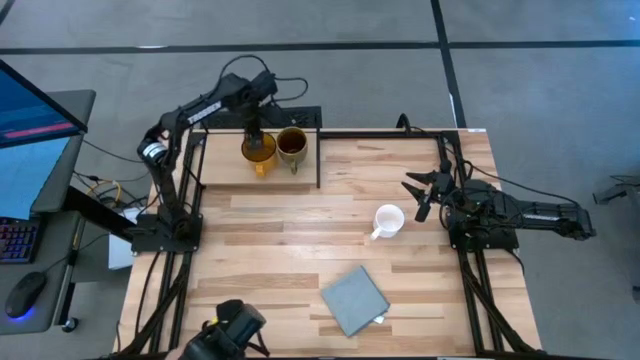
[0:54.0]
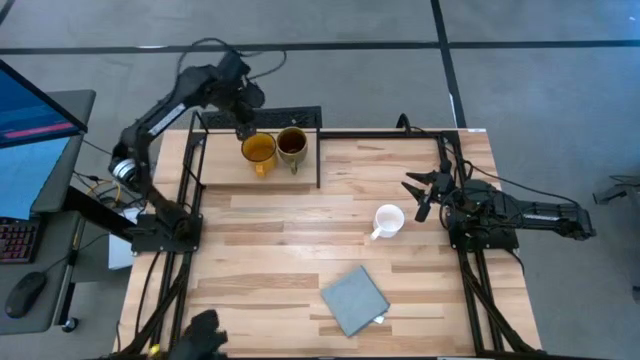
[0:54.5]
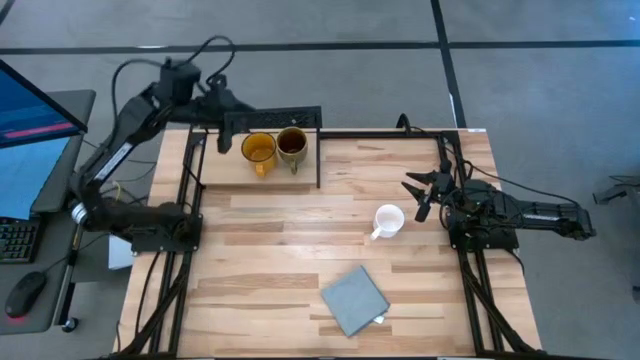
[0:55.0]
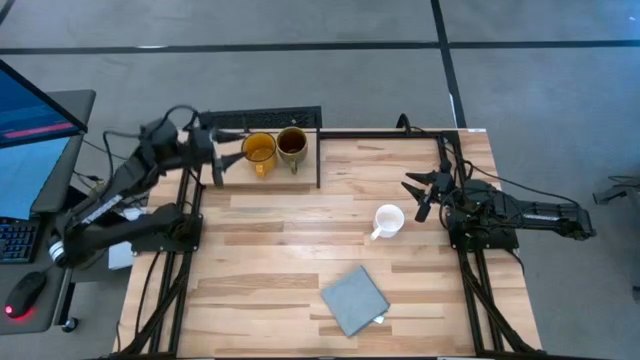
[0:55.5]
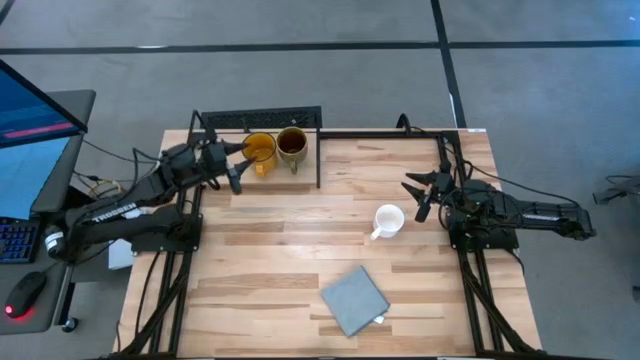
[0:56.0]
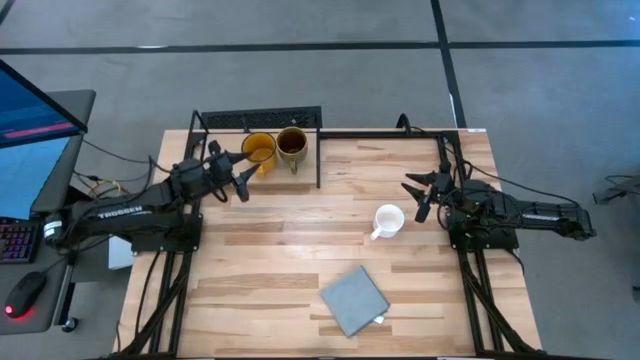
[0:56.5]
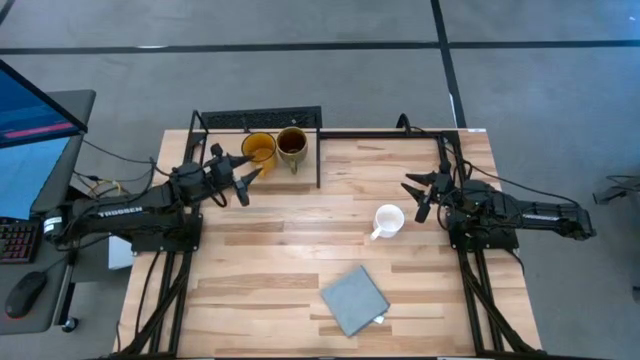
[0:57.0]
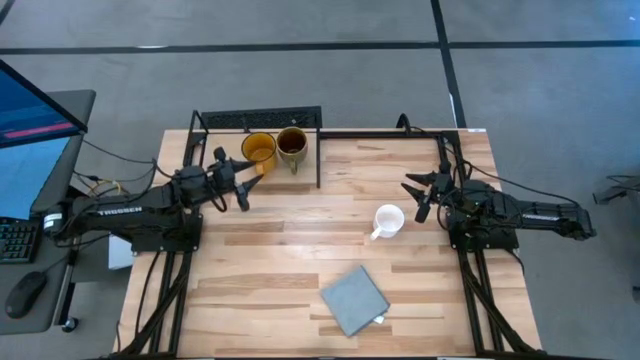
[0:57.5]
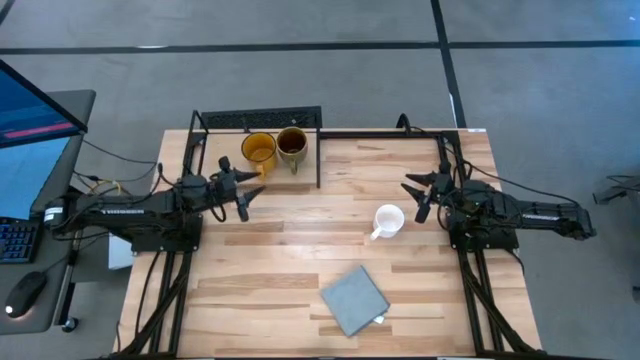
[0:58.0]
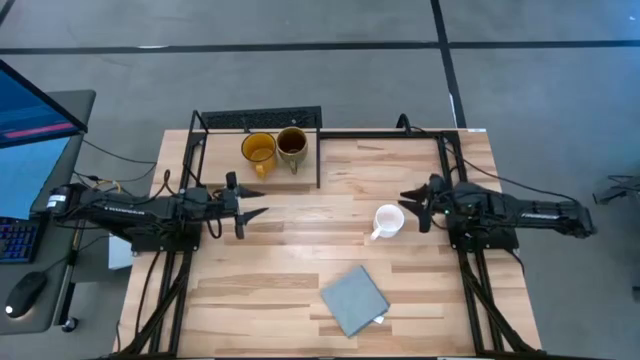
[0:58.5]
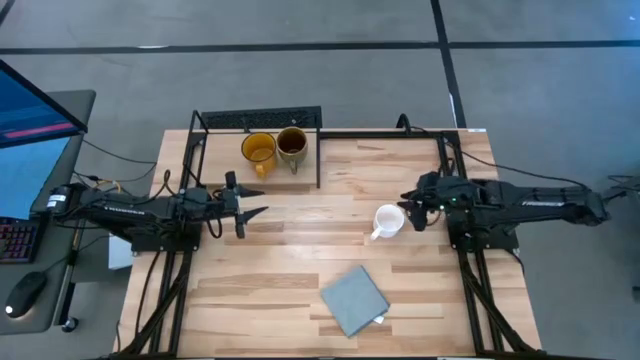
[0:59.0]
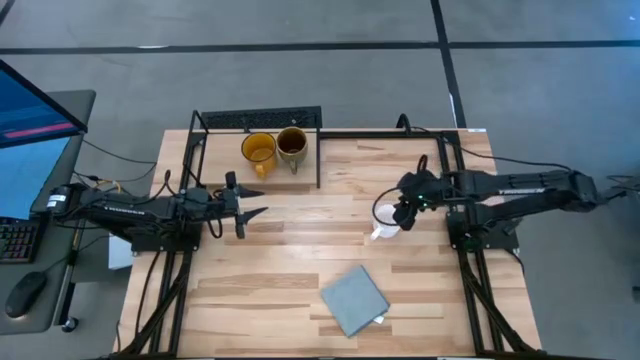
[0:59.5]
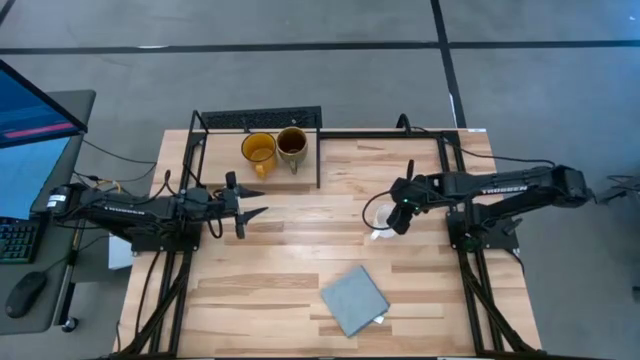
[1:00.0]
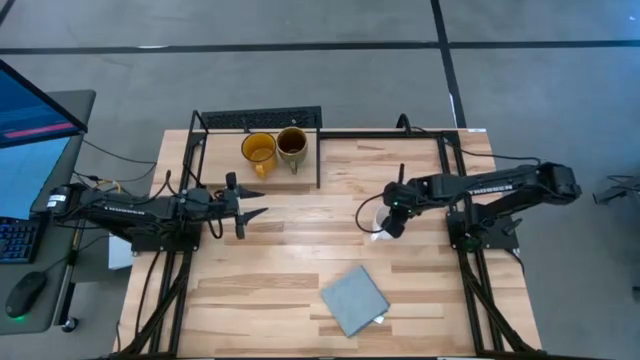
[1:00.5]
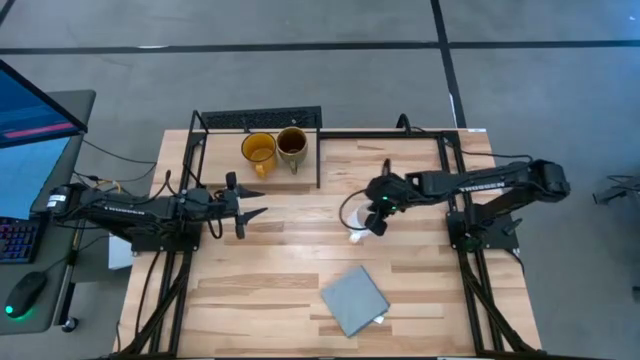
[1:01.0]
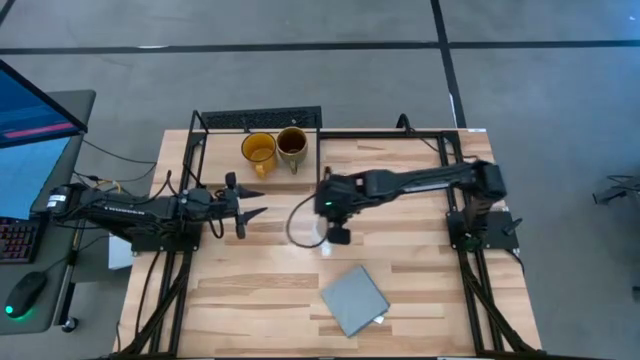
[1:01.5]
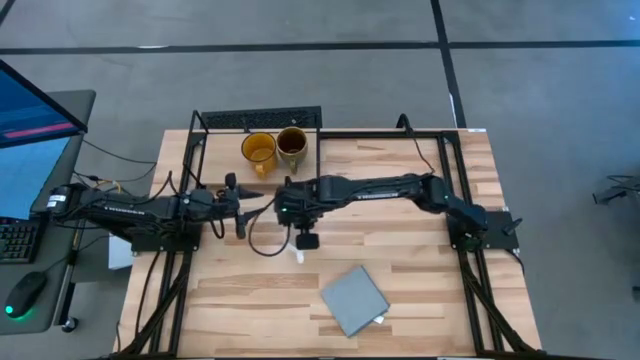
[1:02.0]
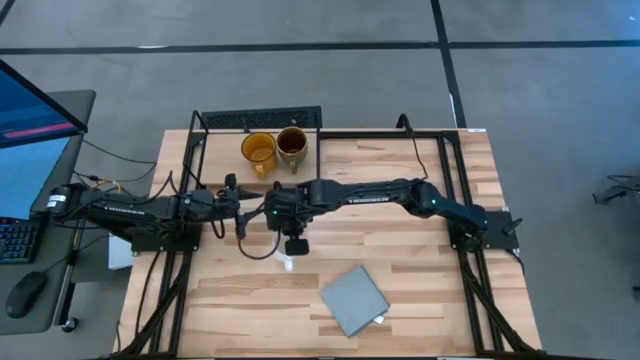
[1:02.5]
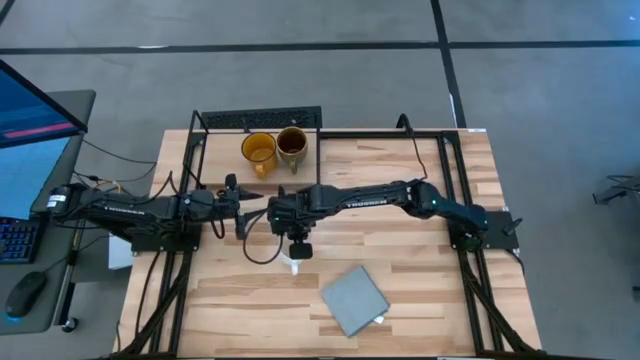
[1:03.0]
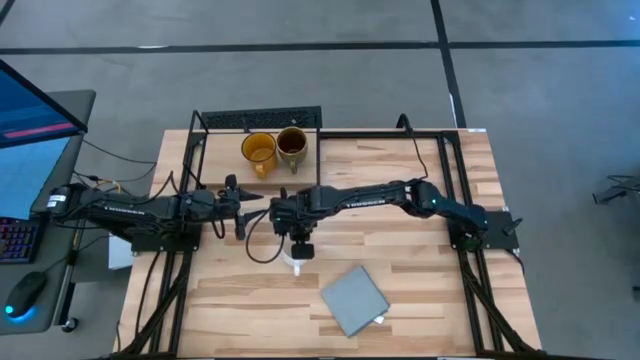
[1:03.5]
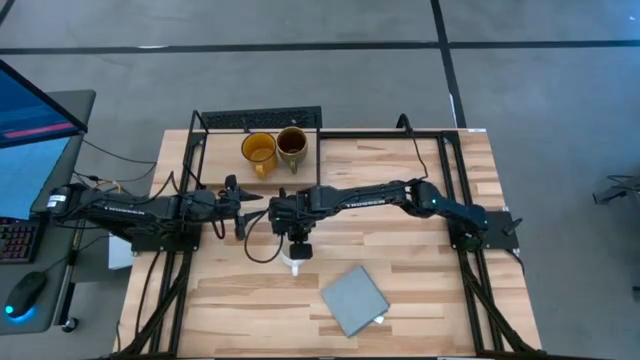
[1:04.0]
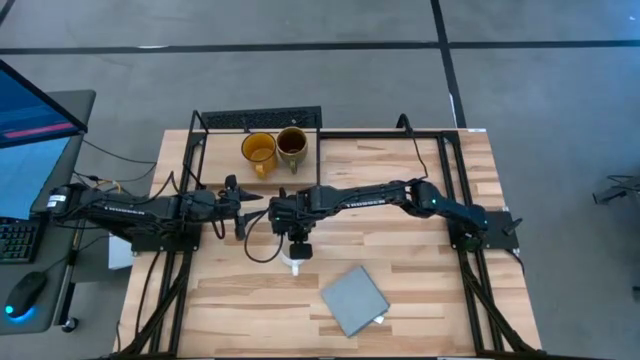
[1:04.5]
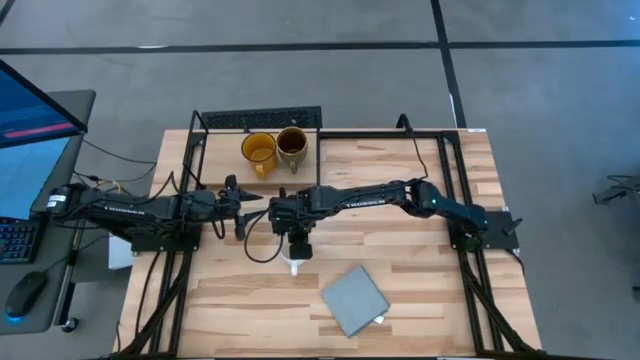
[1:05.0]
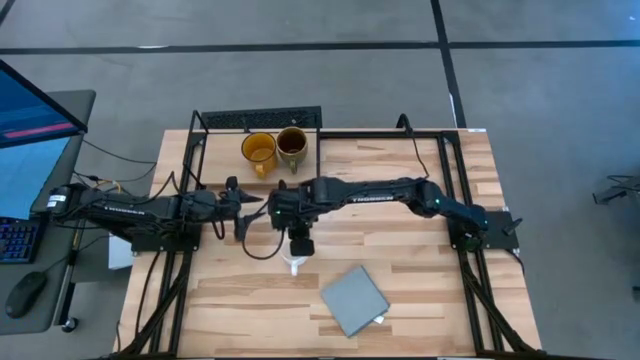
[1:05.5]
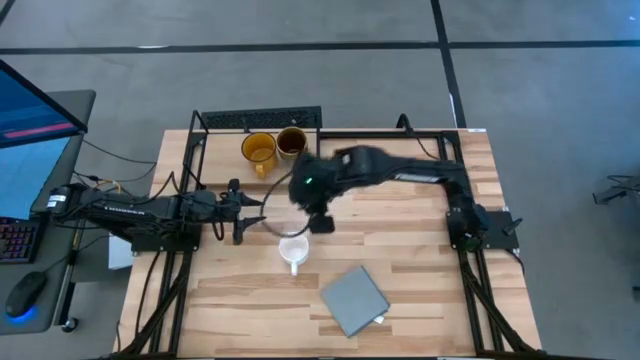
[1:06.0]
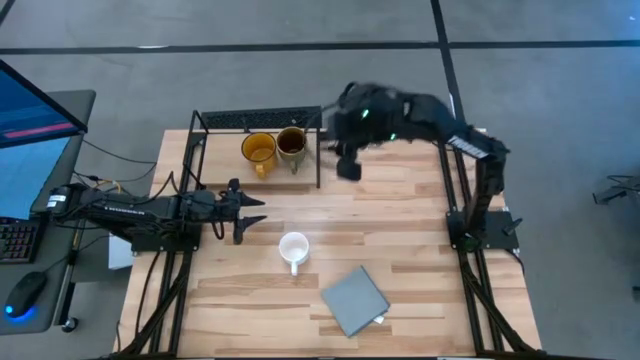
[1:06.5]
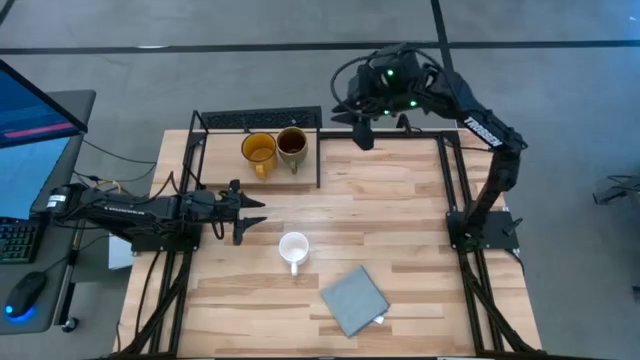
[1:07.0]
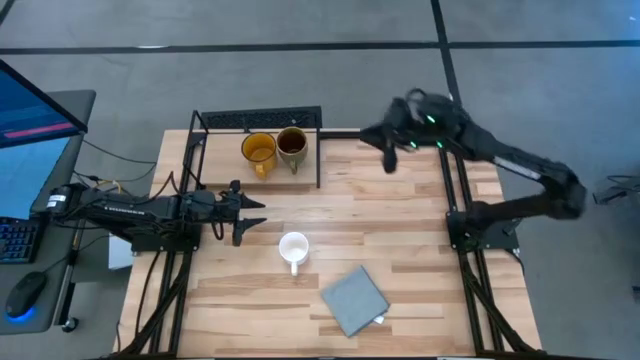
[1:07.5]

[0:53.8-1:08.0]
Task: Stack small to large cups/mugs on shelf
Put the white mug on the shelf

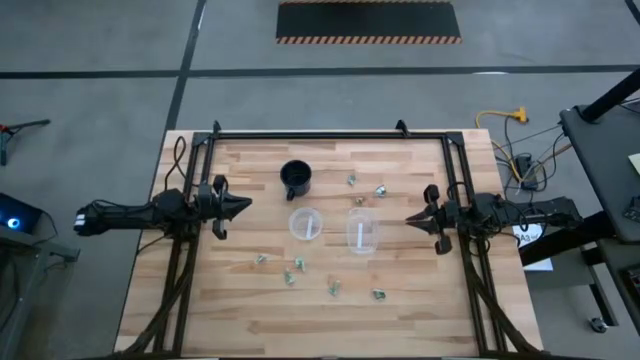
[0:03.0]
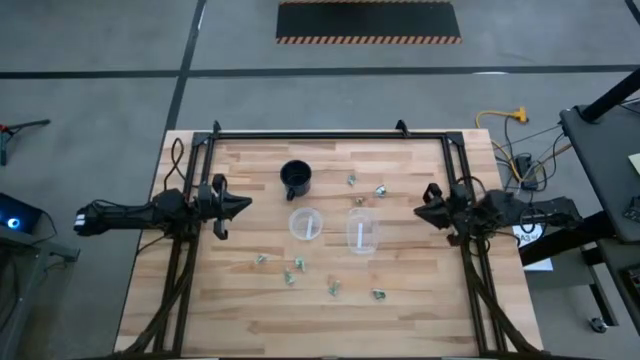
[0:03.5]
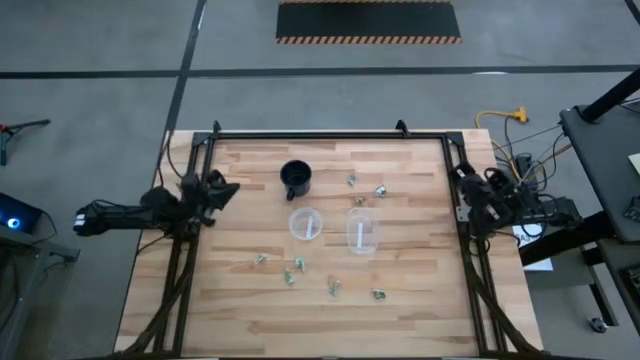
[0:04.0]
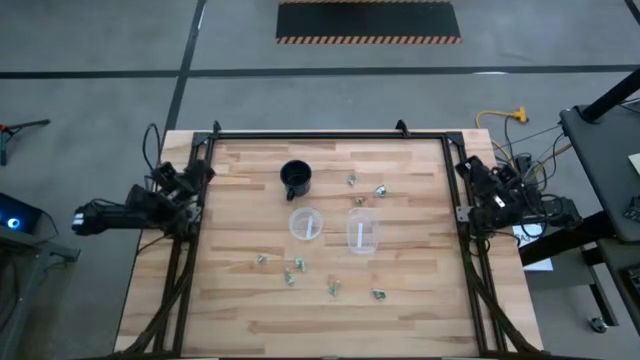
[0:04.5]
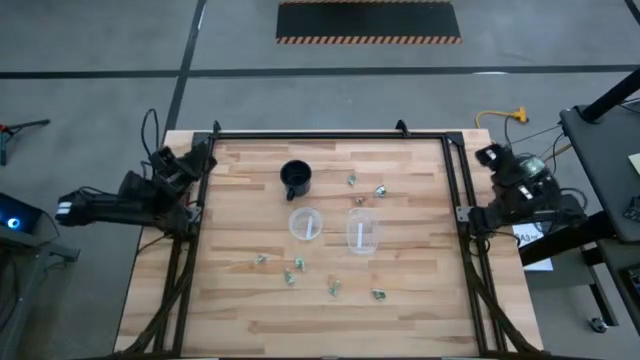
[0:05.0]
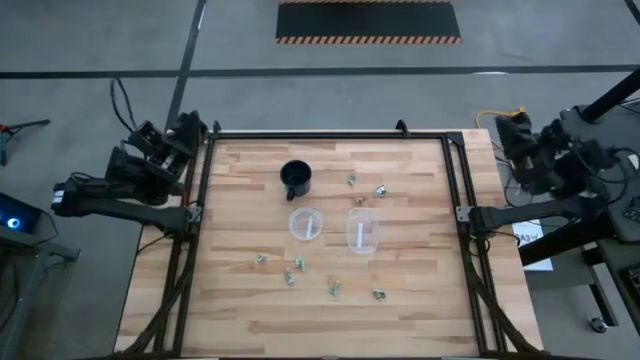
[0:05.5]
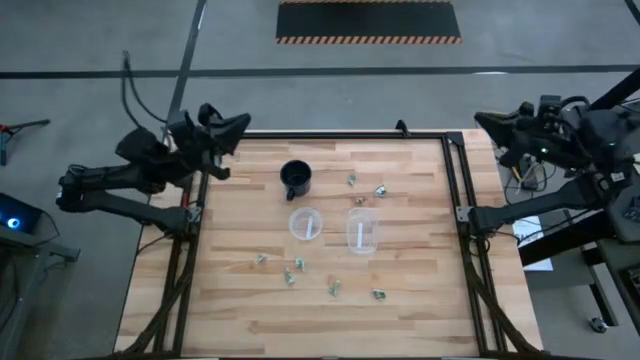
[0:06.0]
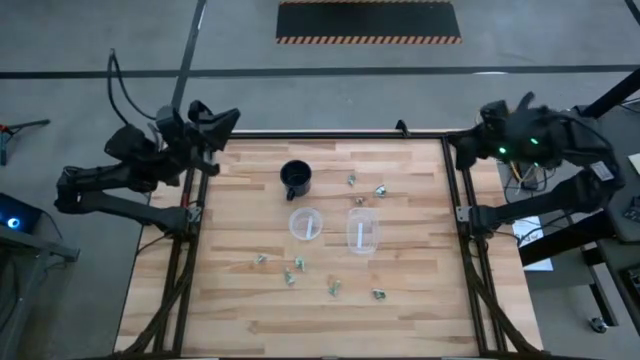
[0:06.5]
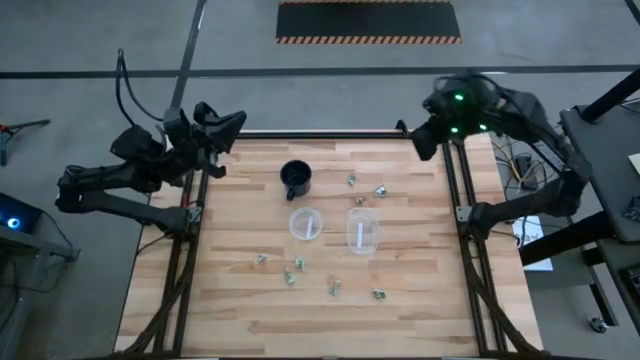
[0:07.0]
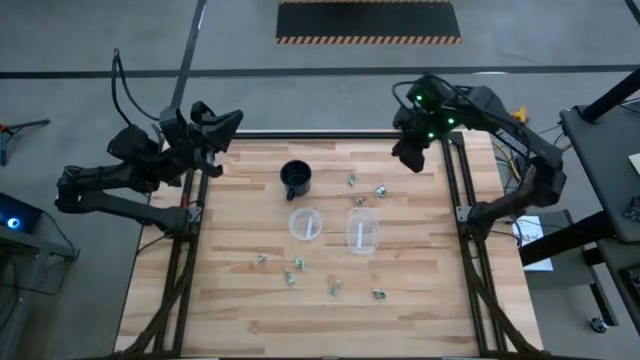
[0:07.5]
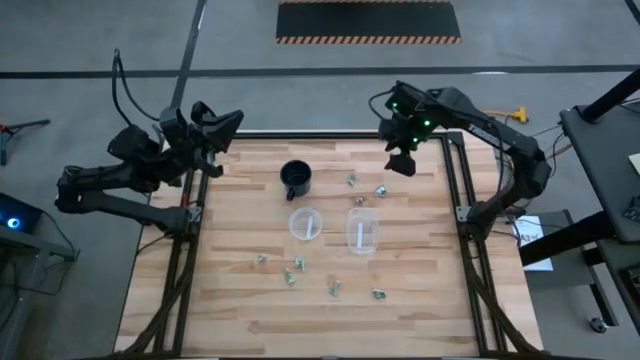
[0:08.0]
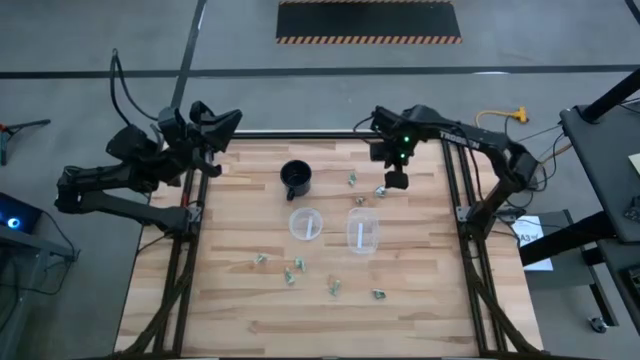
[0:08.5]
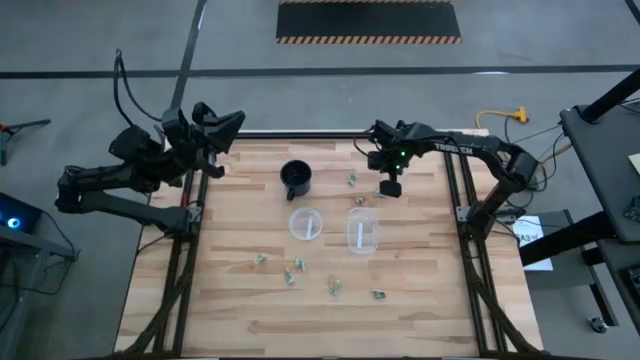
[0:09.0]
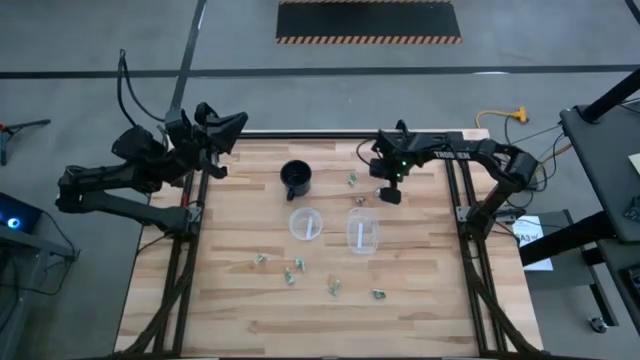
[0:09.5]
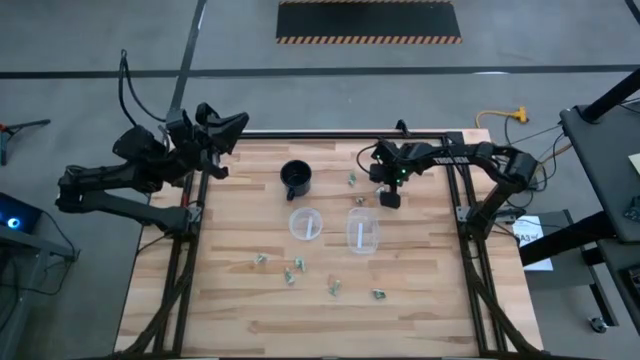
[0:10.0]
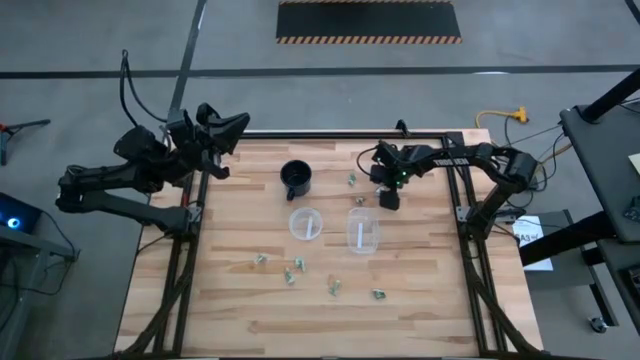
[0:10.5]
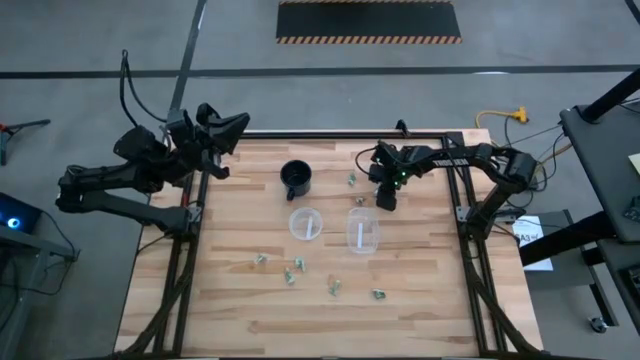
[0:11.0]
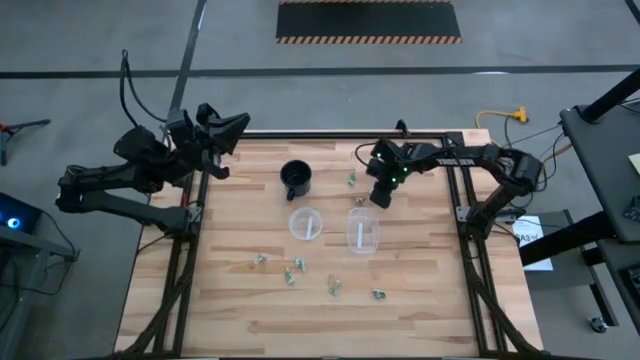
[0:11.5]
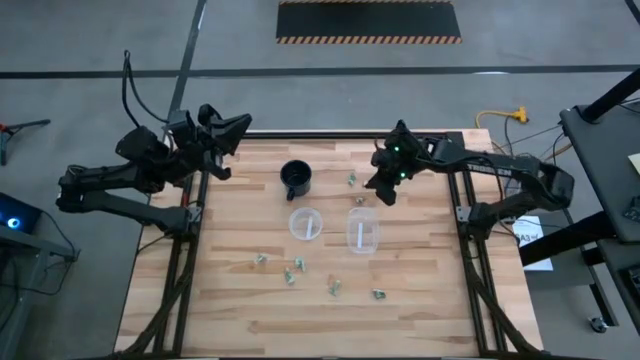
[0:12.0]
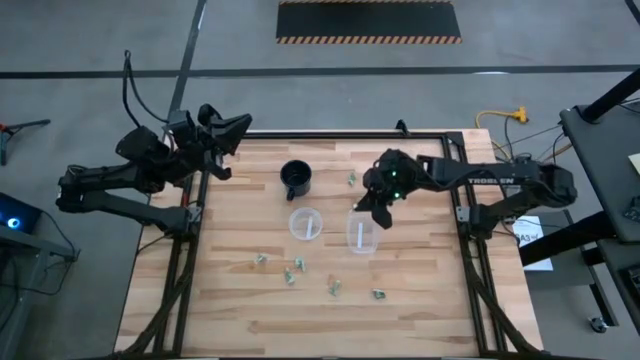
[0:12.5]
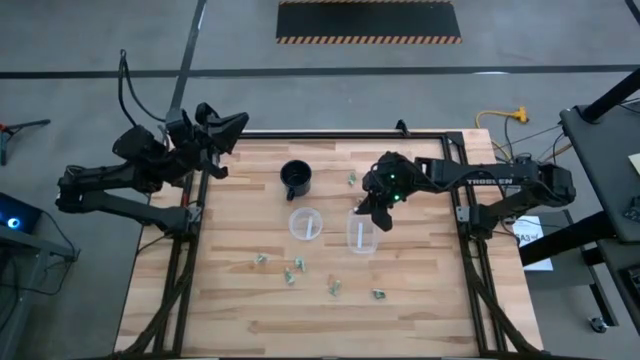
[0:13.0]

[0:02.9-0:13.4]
Task: Pick and place Stevia / Truvia into bins
Put the truvia packet into the oval transparent container
